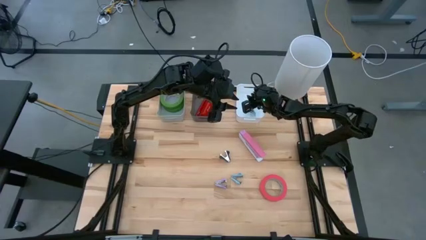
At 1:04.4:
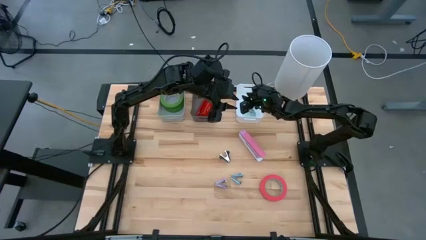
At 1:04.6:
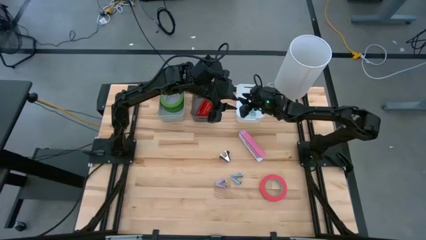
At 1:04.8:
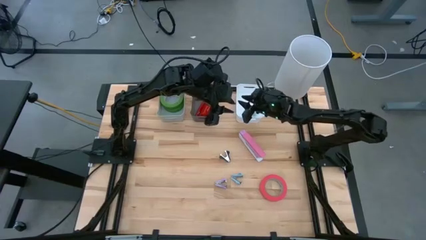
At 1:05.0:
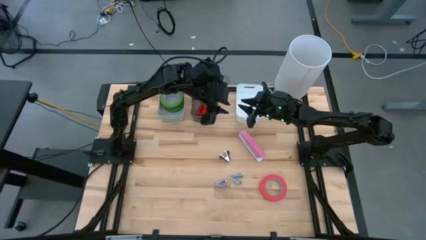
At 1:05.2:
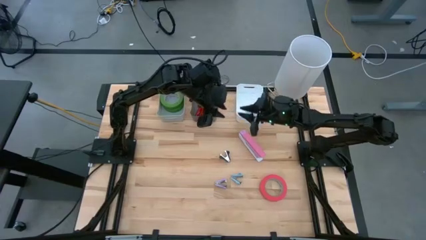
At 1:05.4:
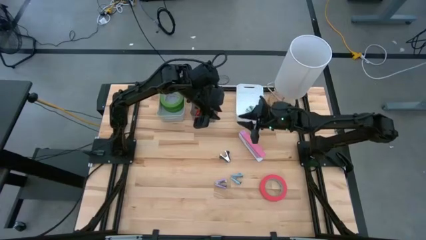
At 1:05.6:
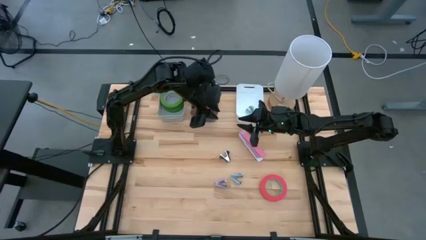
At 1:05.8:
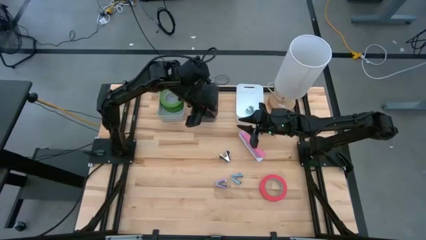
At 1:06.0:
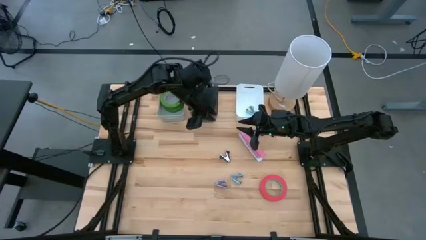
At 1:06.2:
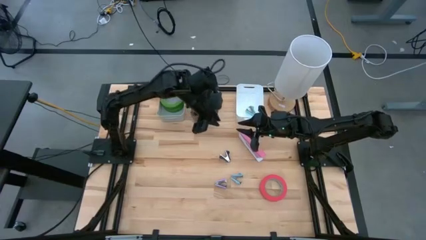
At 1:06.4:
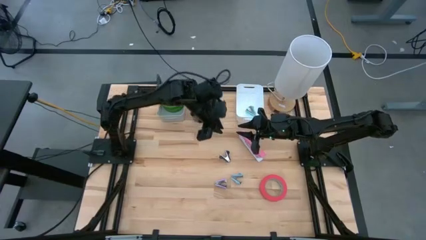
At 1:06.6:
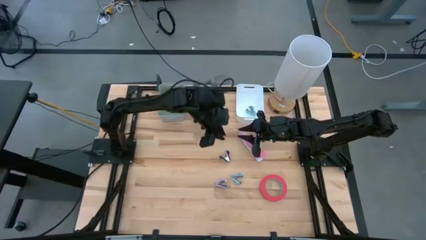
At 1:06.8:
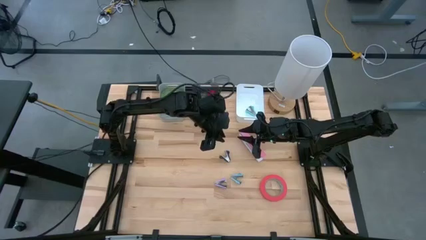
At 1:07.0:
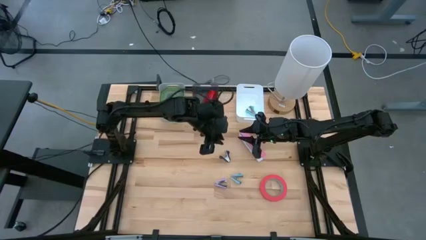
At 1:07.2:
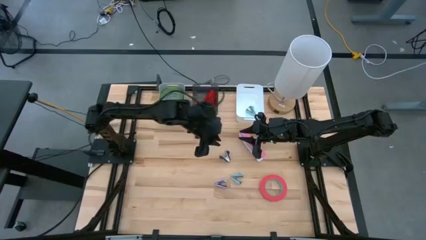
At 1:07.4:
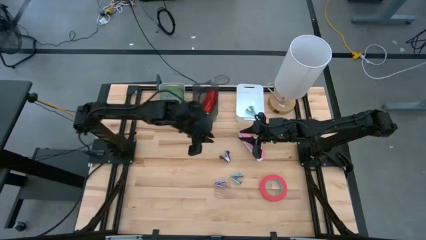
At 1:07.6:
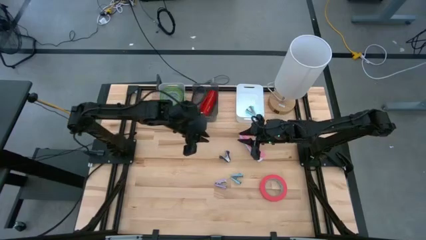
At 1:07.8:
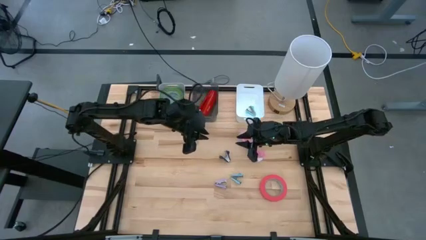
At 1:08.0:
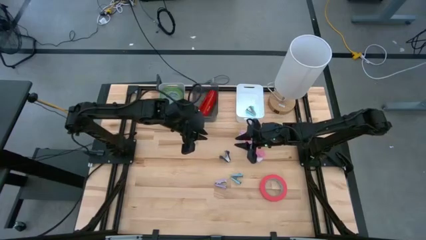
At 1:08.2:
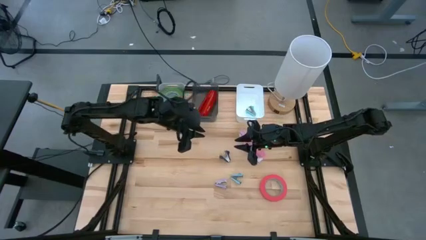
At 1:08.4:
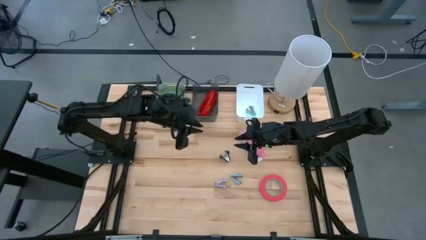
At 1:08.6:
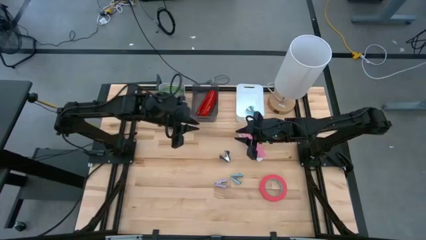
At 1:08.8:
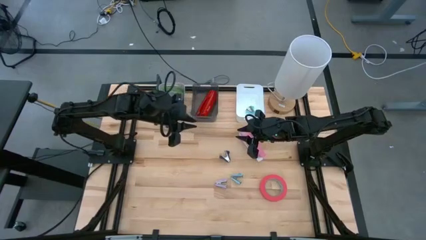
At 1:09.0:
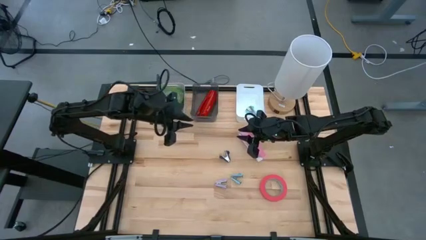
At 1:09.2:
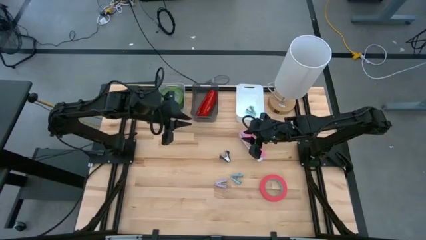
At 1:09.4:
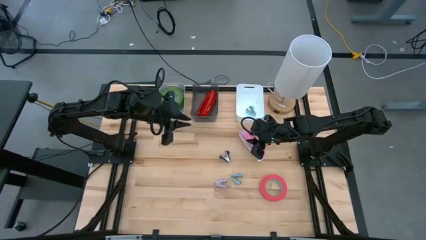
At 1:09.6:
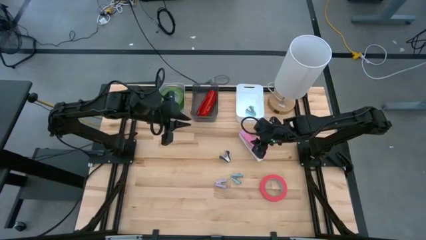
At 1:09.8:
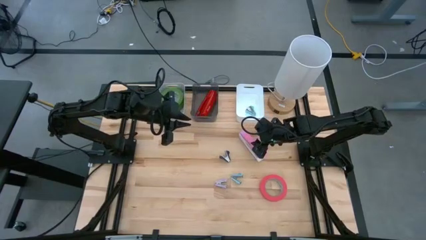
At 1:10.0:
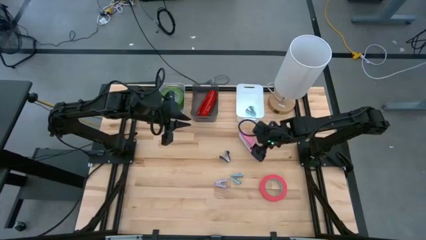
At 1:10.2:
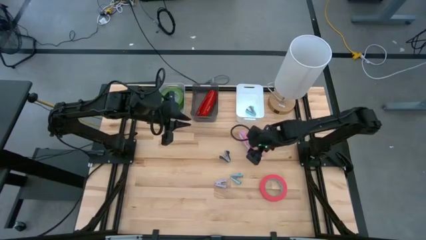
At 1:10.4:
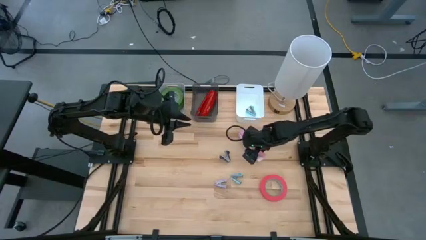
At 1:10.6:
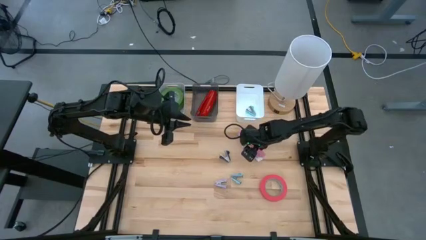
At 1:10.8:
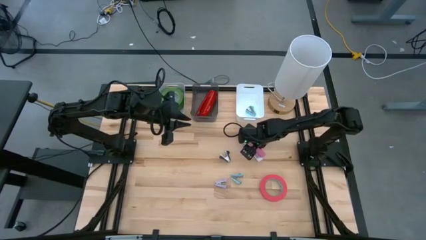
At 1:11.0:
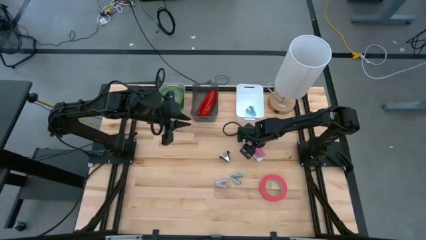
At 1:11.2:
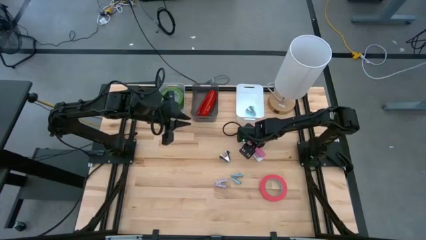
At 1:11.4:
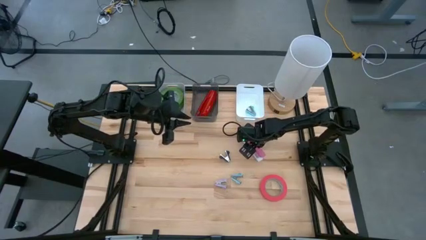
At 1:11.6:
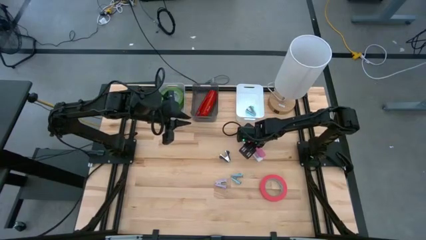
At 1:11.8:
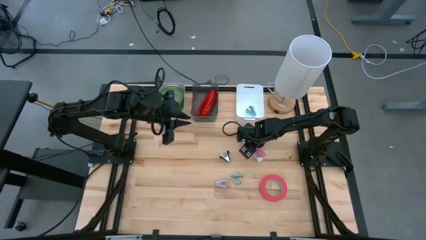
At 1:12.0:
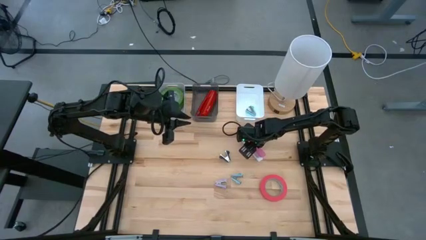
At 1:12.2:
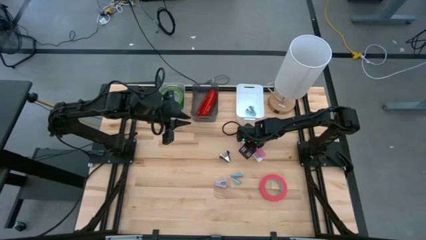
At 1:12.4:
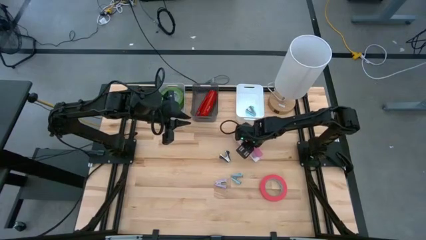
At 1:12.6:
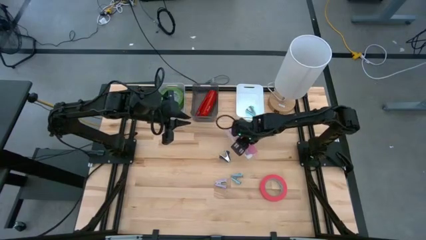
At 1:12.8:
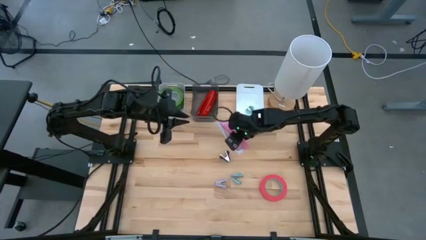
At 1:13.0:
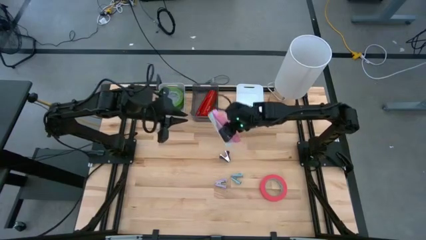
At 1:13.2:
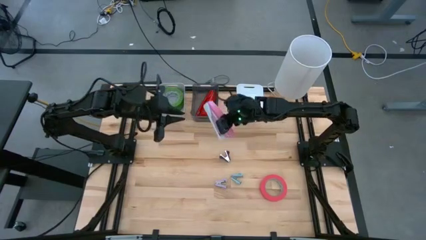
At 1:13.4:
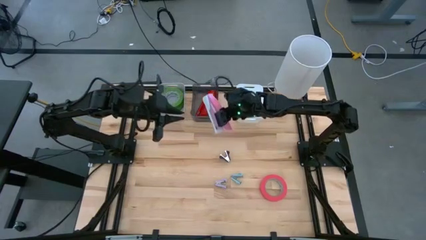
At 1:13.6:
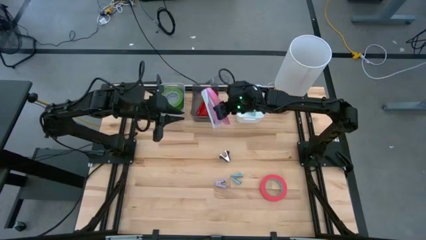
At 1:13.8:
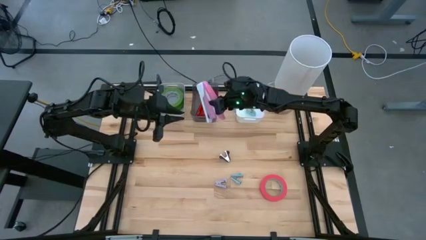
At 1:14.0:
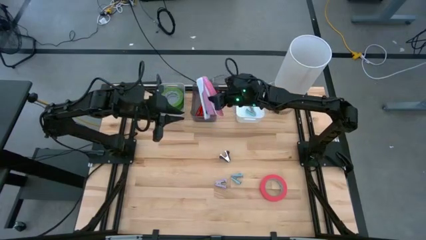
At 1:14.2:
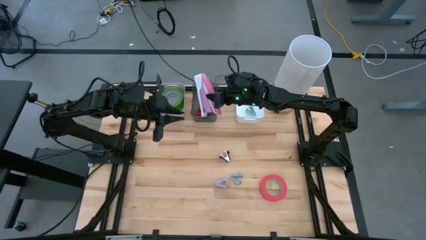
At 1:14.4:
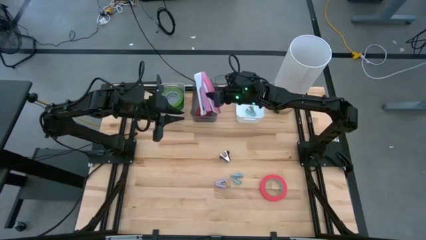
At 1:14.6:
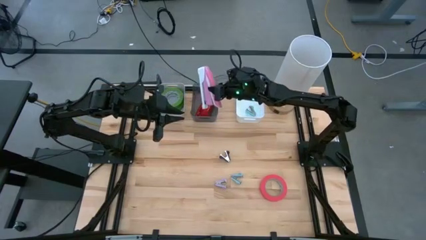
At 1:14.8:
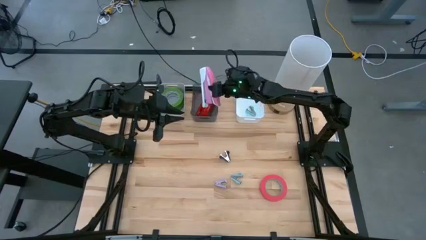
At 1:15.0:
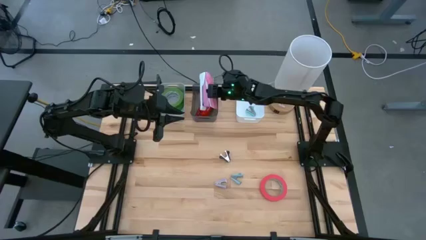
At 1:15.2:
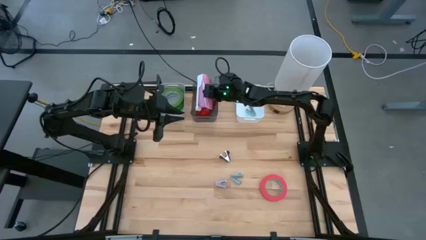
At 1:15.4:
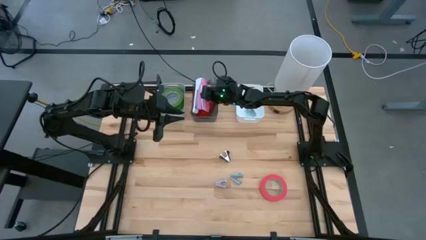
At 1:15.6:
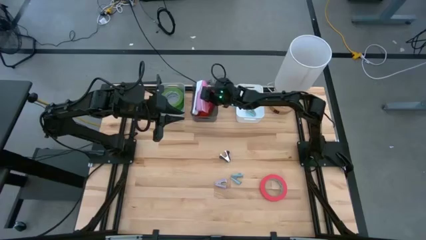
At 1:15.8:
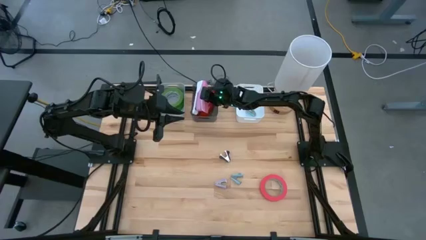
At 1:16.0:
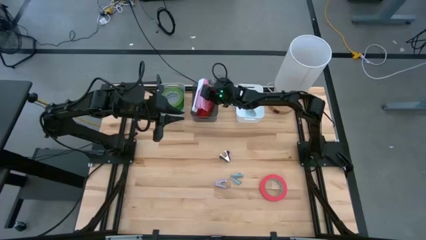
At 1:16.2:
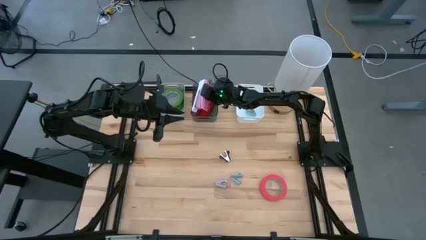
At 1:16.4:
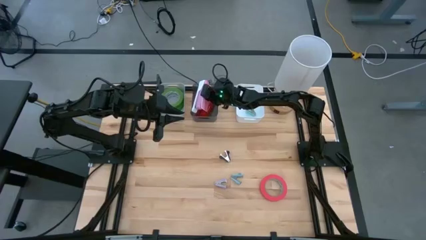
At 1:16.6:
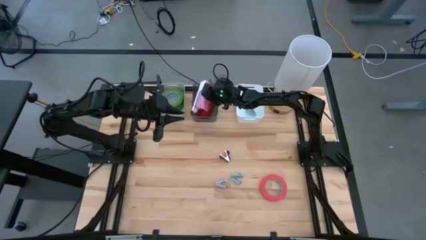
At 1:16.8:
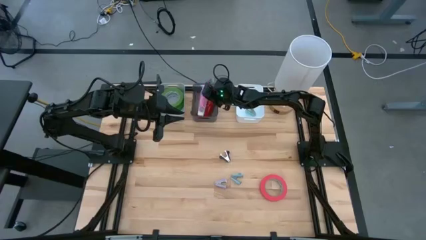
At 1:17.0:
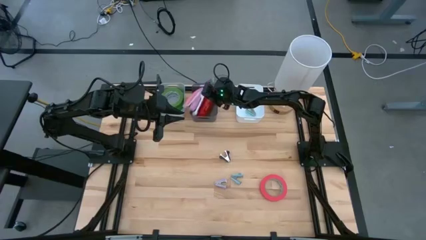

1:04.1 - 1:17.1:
Task: Pick and place Stapler, Stapler remover, tape
Put the pink stapler into the black bin
